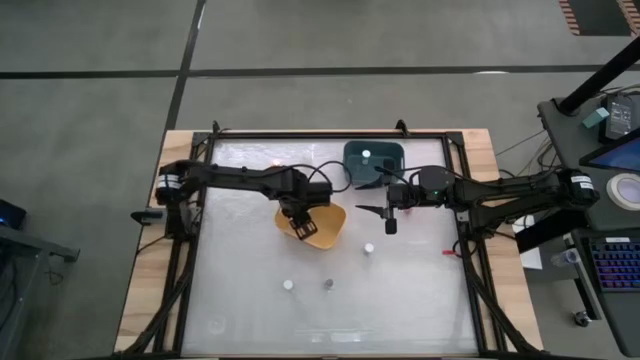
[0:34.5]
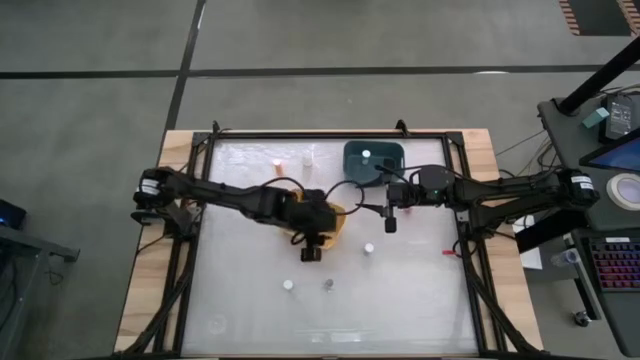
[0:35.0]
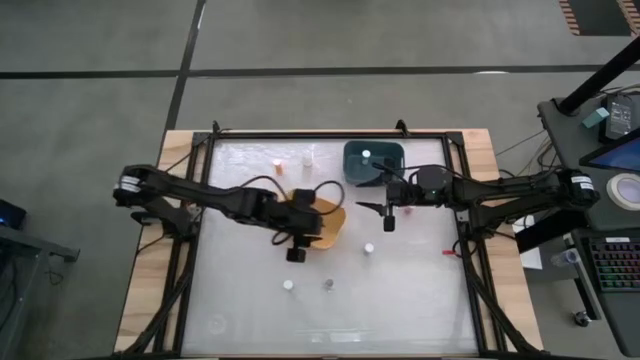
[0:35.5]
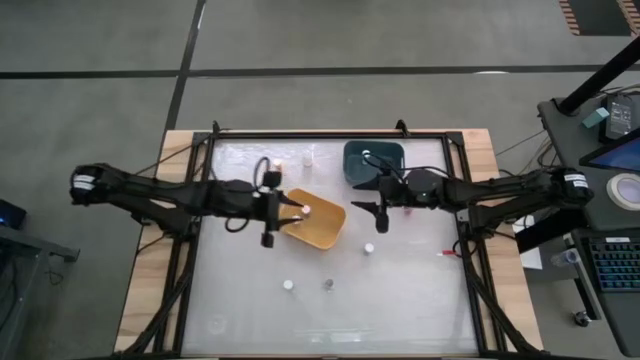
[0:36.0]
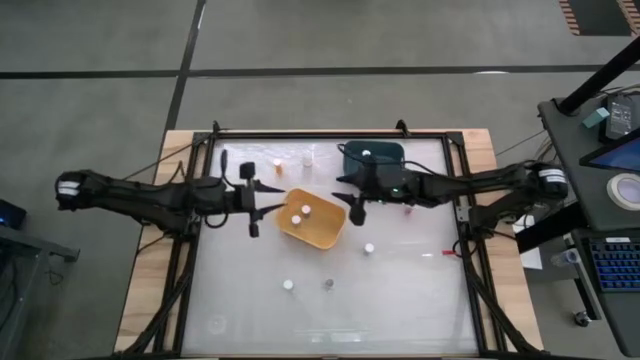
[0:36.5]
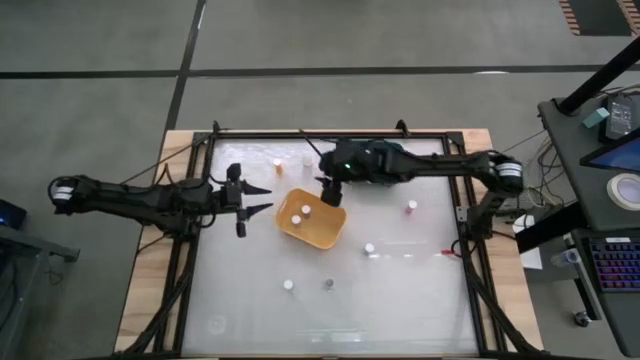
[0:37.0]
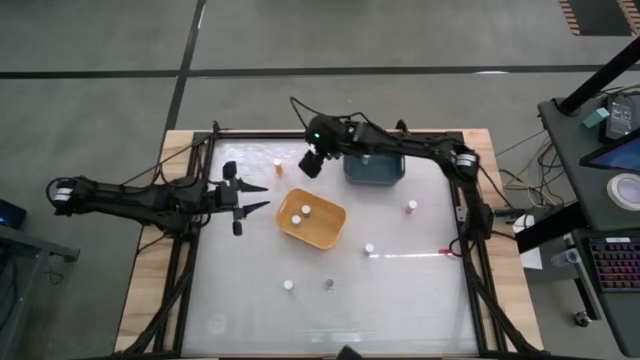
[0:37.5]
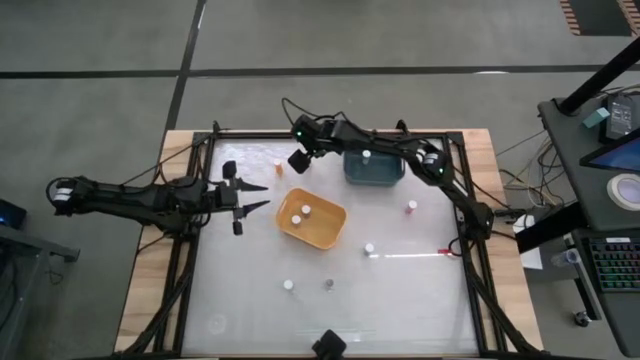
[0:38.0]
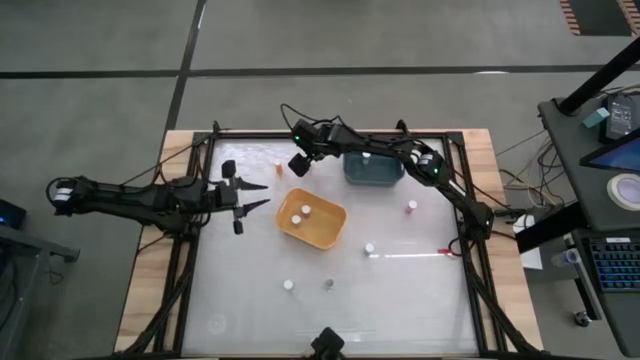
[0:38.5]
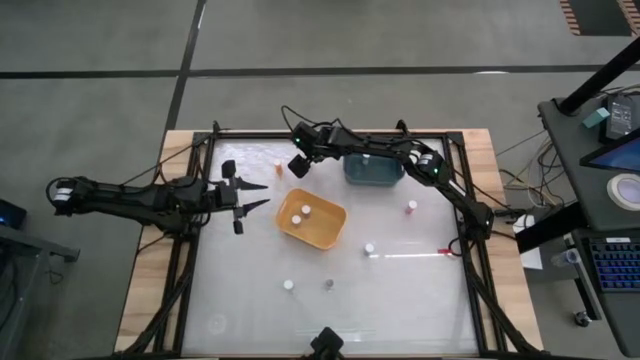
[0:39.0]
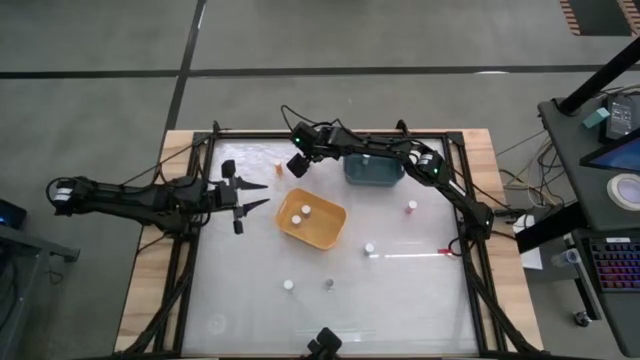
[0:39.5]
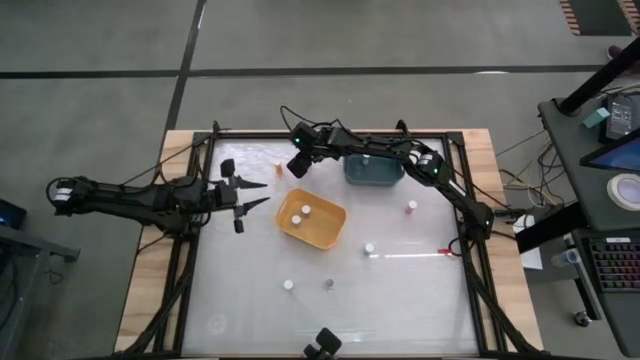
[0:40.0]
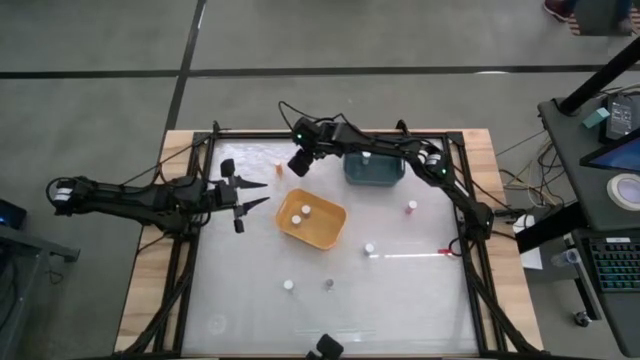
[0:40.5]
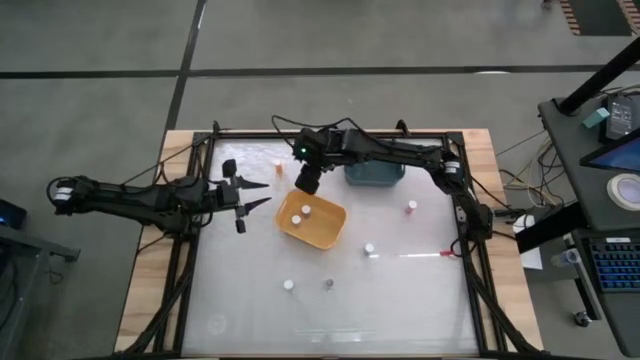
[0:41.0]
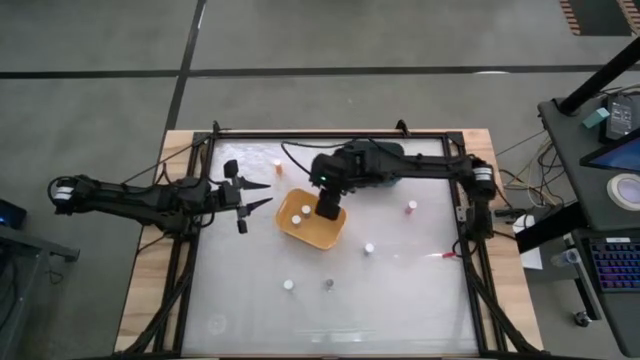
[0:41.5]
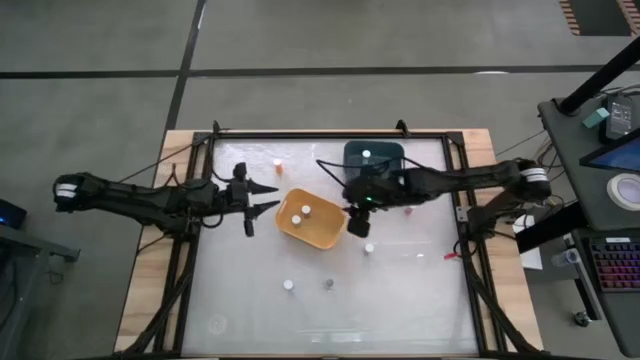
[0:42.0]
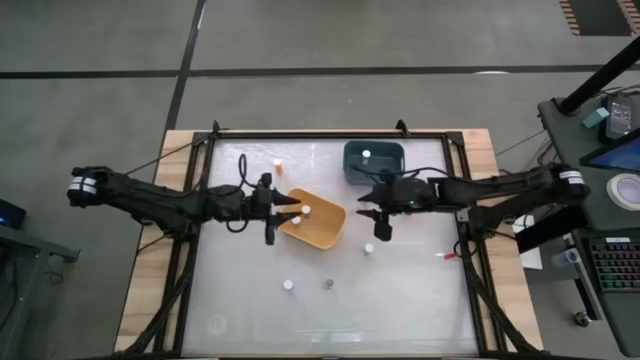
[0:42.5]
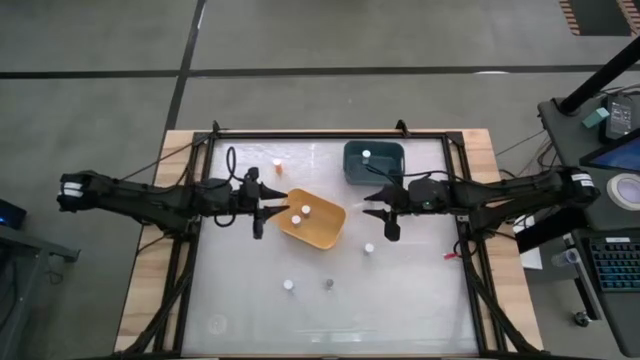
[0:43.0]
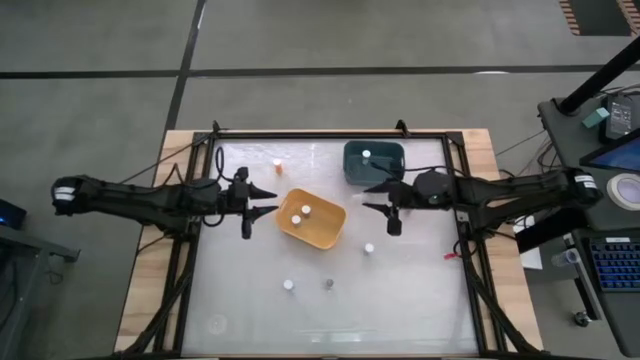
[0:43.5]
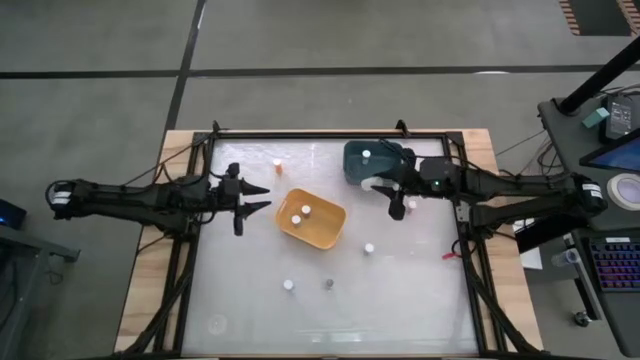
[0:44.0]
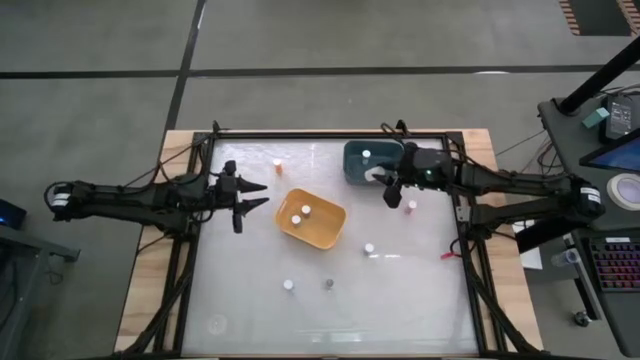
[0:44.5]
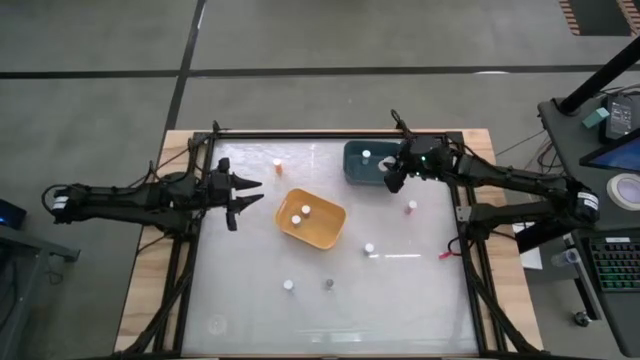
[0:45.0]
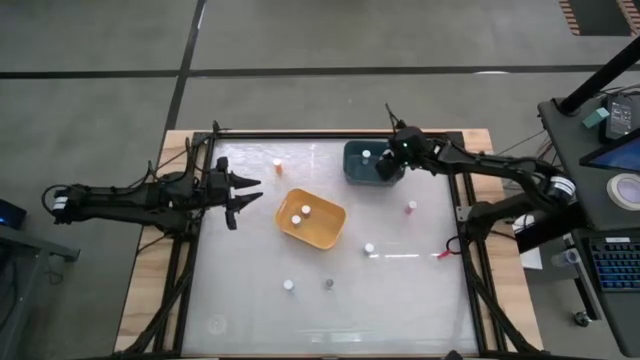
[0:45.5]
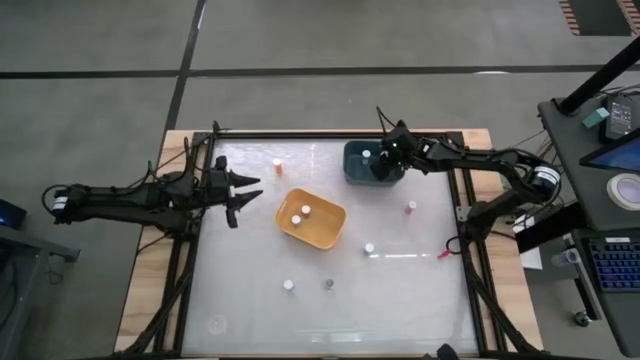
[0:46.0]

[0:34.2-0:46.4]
Task: Pick and place medicine bottles into bin by pill shape (circle, oval)
Put the white pill bottle into the blue bin

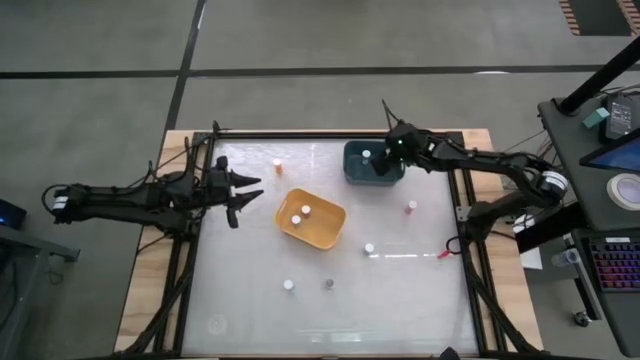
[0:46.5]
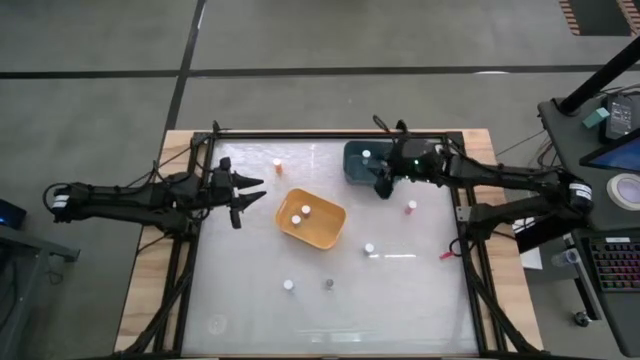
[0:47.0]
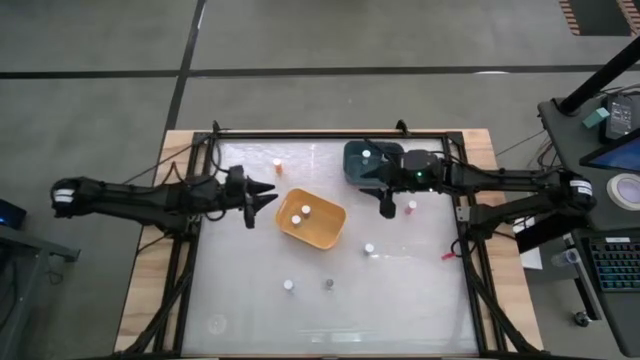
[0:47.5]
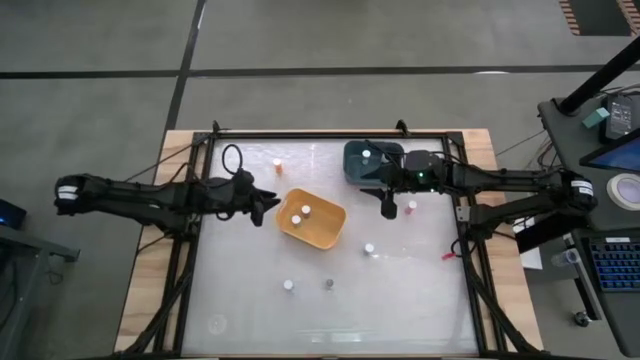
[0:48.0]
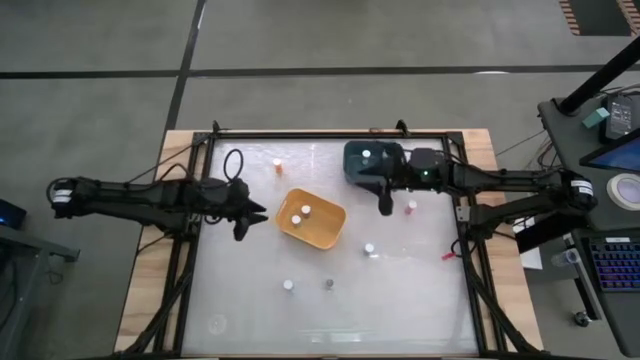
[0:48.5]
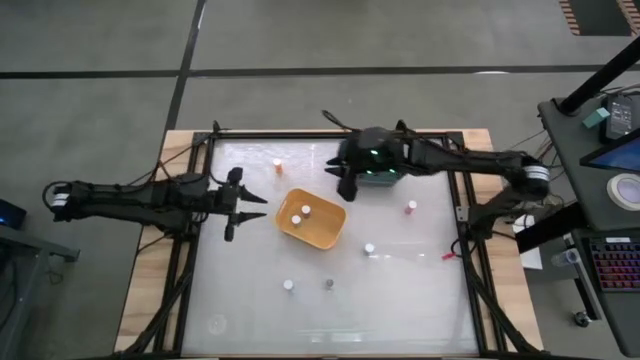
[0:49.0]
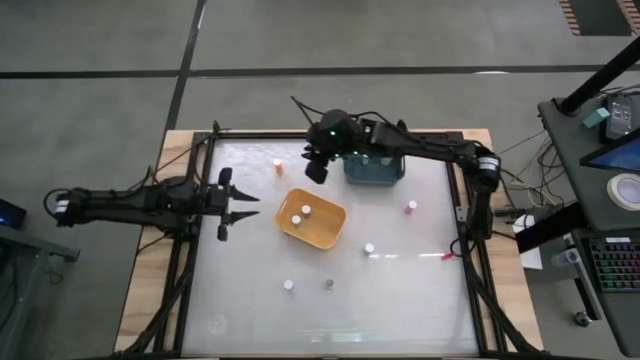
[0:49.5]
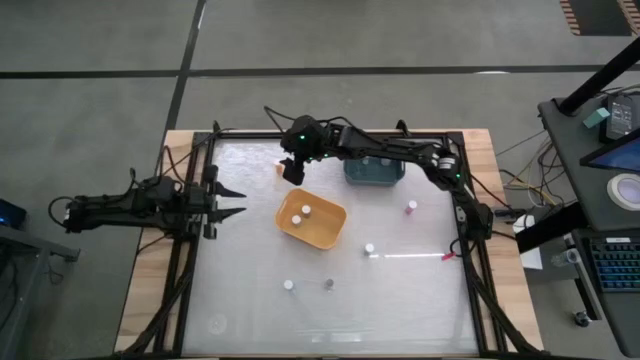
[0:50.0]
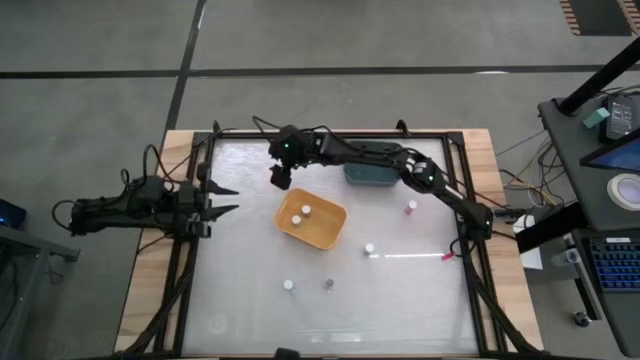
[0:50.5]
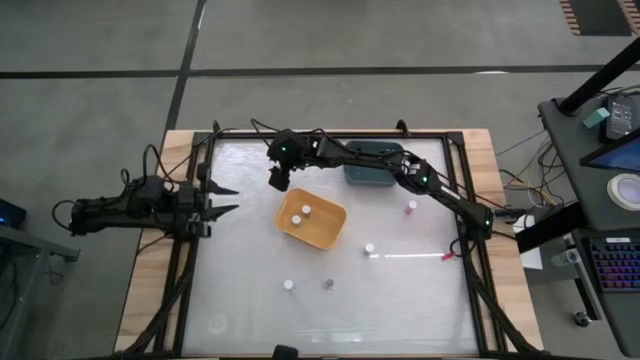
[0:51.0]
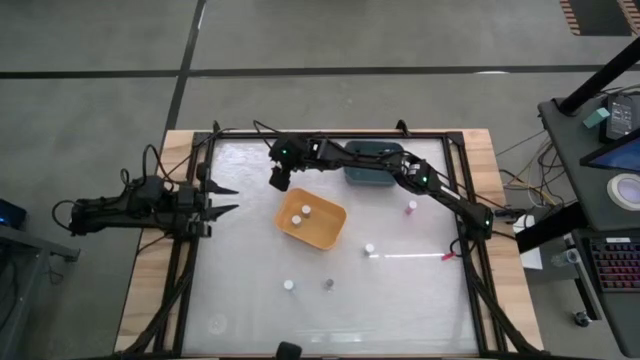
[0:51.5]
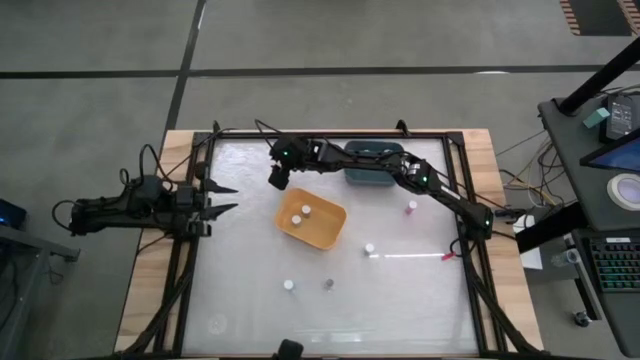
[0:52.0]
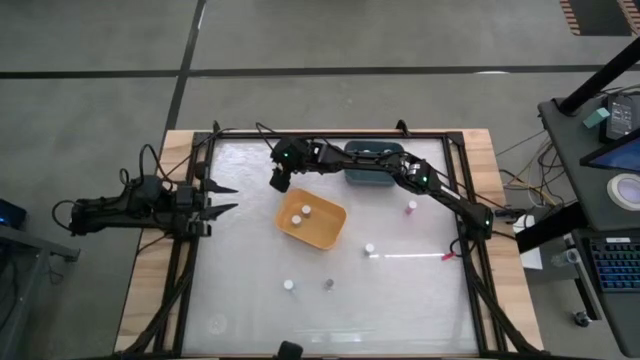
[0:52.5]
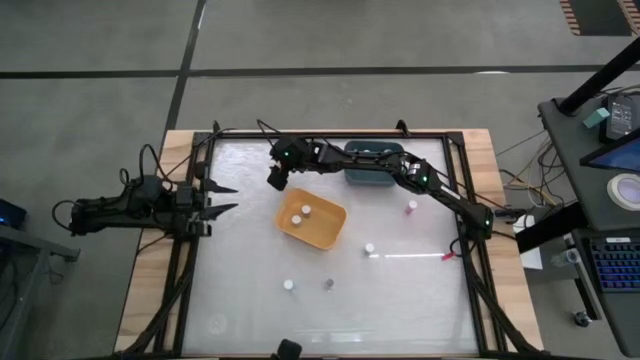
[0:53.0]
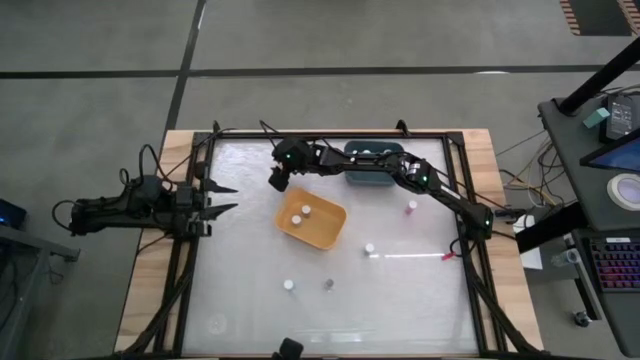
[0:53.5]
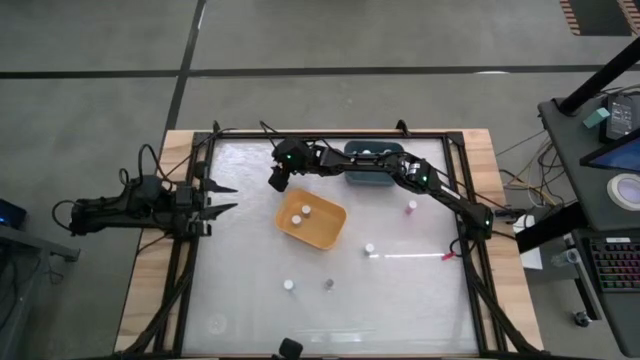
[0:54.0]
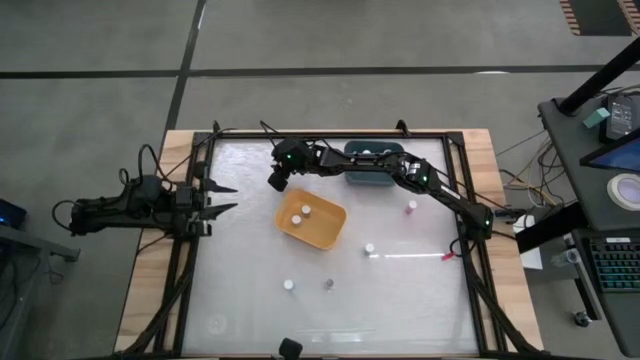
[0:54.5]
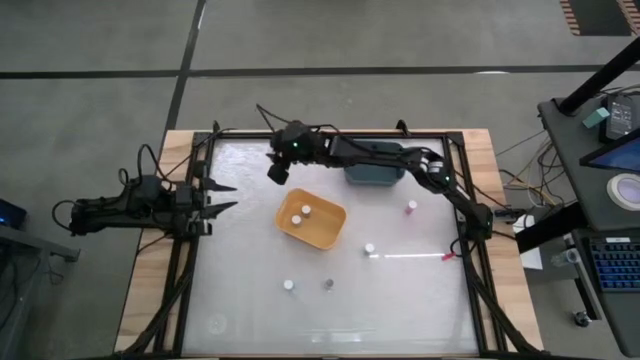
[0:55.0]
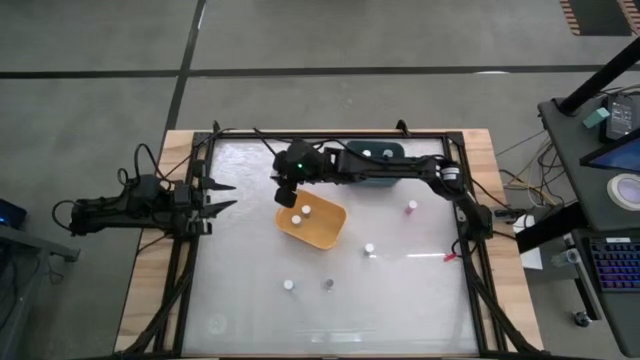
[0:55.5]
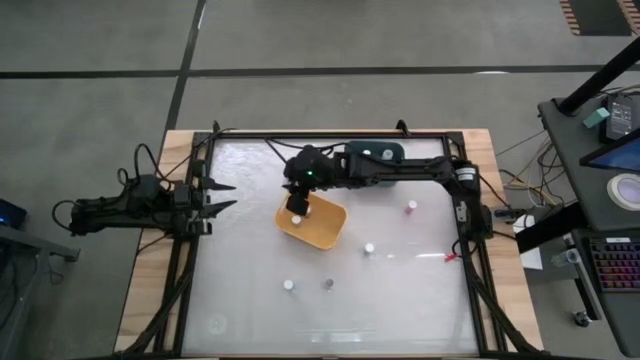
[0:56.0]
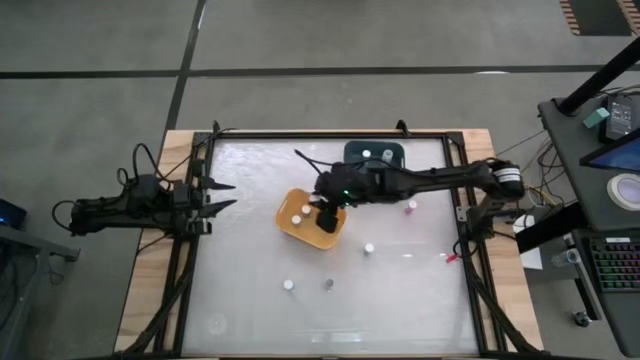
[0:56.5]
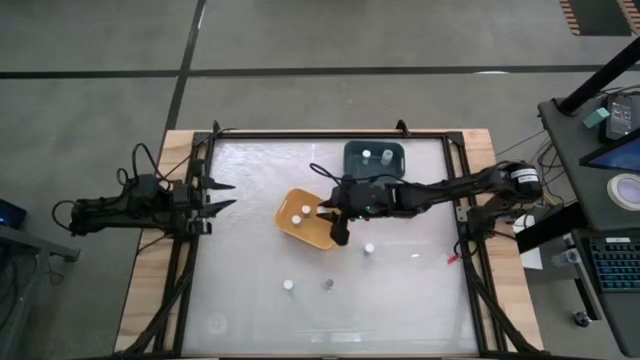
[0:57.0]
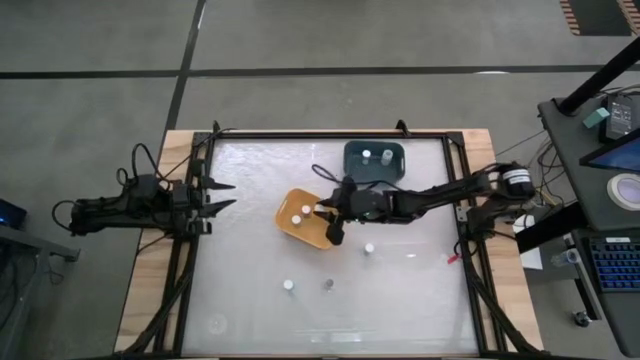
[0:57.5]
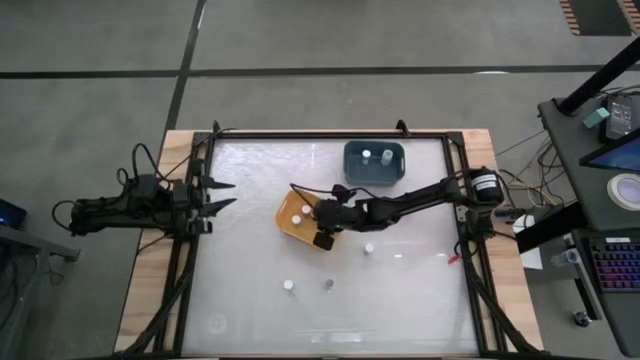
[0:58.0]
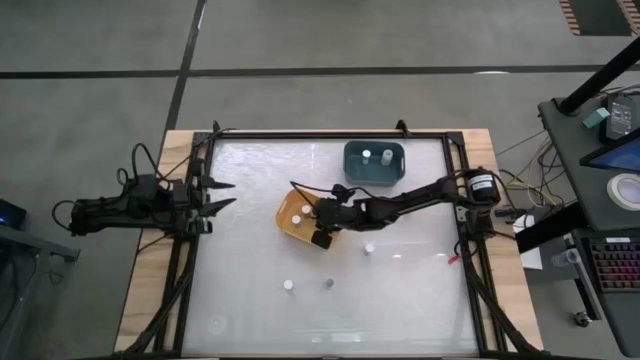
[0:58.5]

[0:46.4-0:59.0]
Put the yellow pill bottle into the yellow bin
